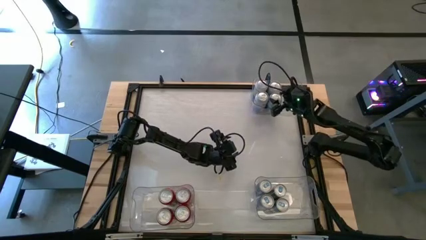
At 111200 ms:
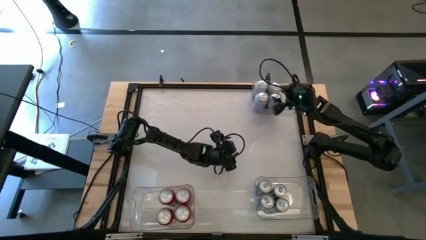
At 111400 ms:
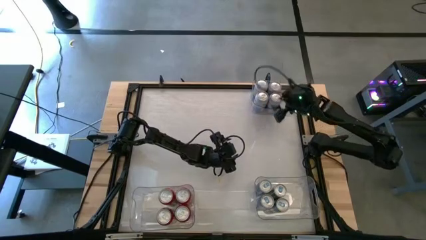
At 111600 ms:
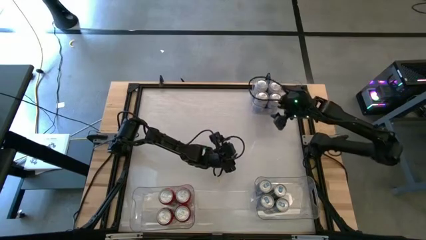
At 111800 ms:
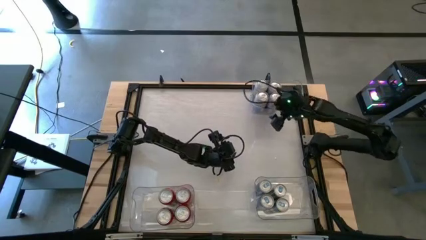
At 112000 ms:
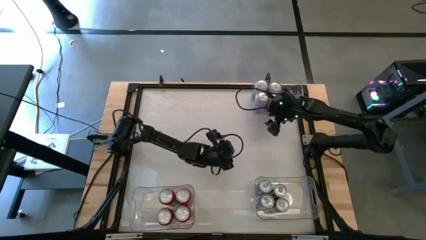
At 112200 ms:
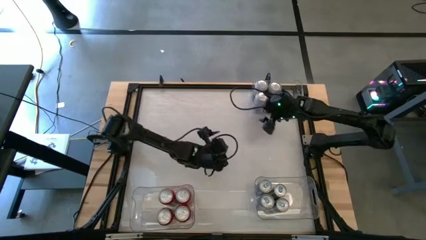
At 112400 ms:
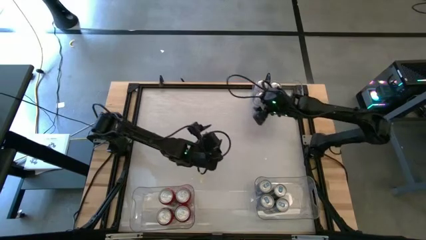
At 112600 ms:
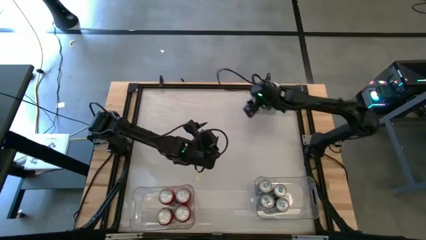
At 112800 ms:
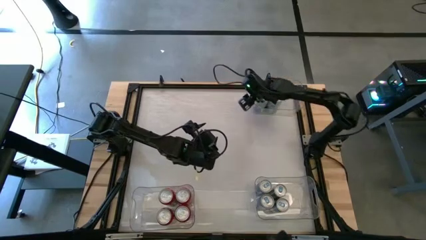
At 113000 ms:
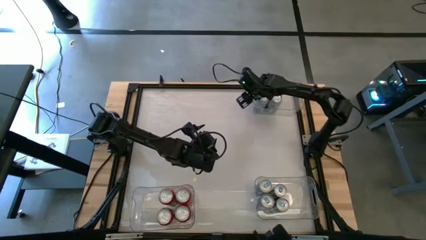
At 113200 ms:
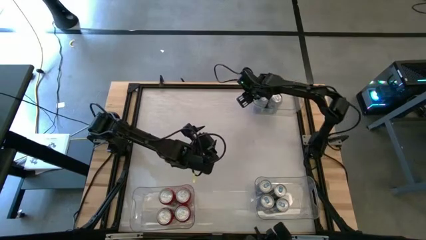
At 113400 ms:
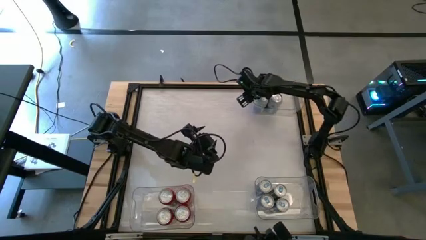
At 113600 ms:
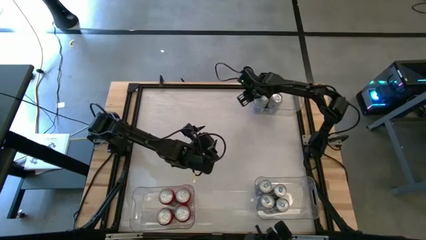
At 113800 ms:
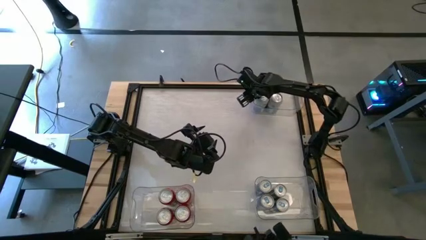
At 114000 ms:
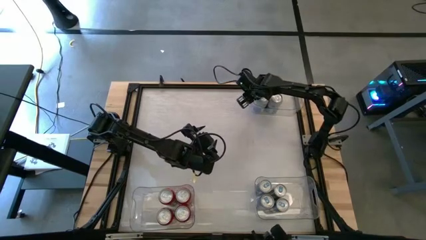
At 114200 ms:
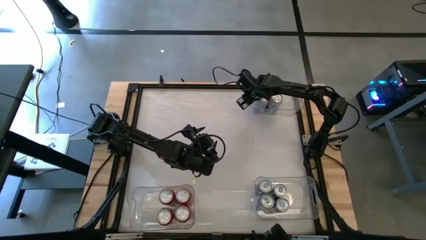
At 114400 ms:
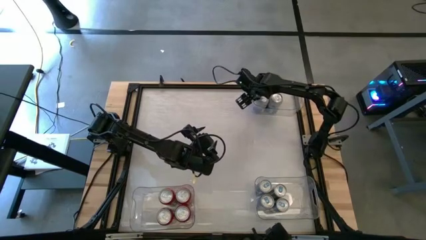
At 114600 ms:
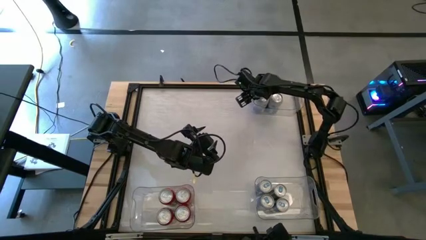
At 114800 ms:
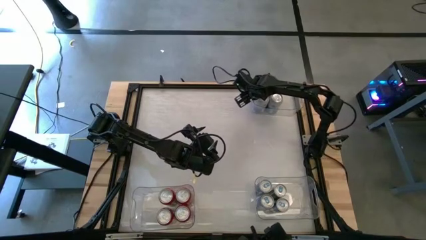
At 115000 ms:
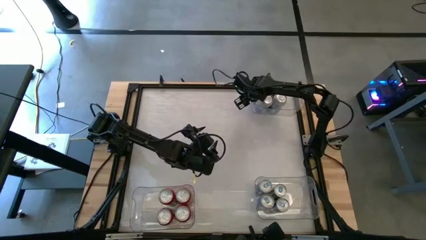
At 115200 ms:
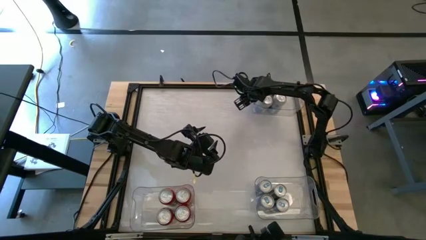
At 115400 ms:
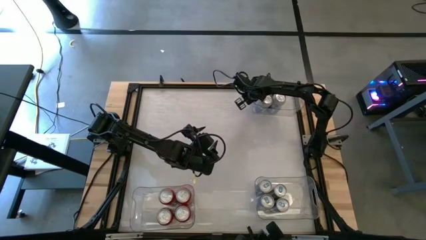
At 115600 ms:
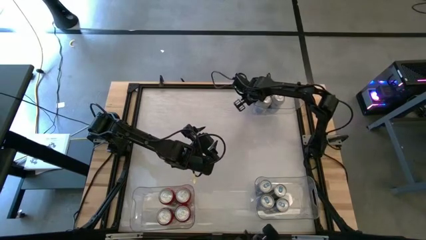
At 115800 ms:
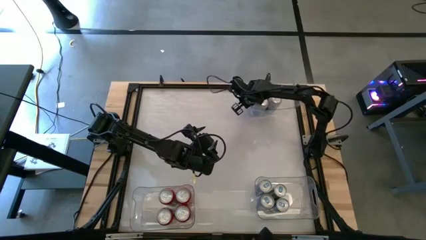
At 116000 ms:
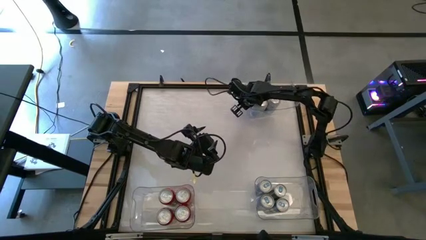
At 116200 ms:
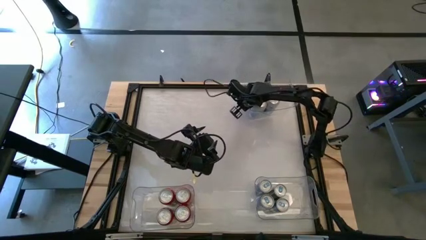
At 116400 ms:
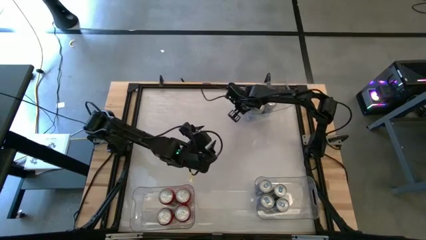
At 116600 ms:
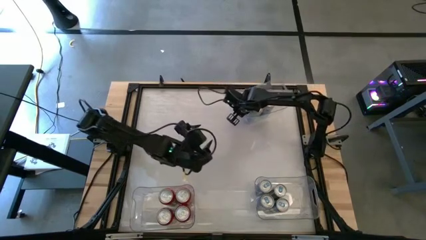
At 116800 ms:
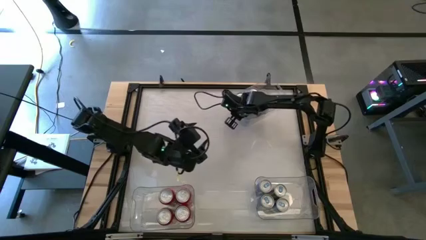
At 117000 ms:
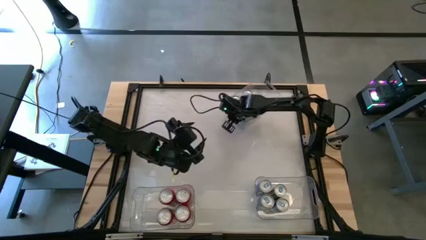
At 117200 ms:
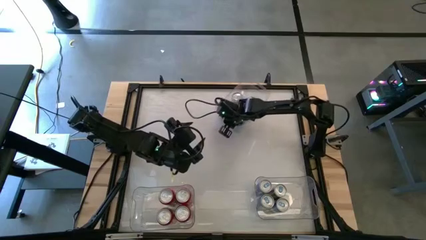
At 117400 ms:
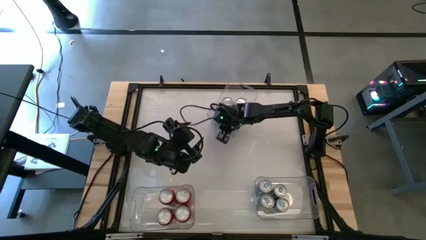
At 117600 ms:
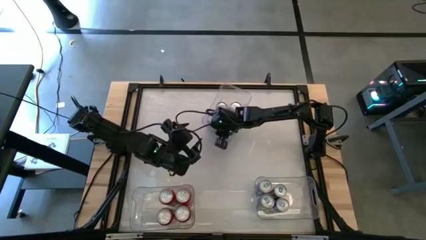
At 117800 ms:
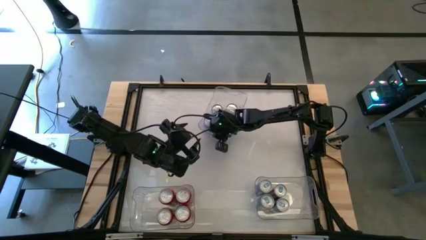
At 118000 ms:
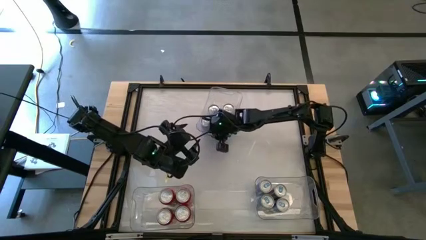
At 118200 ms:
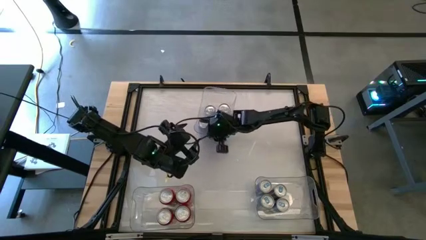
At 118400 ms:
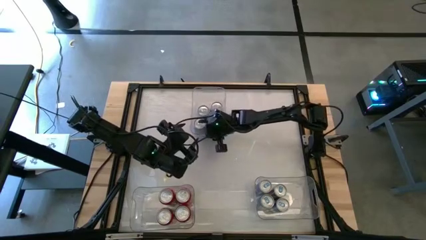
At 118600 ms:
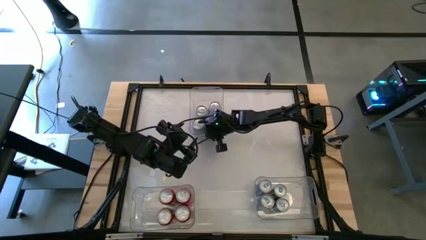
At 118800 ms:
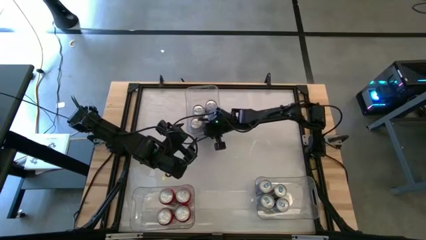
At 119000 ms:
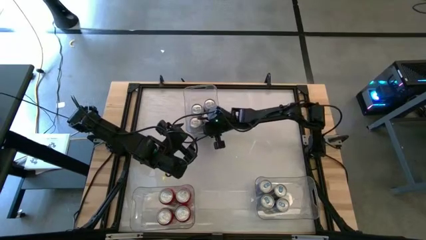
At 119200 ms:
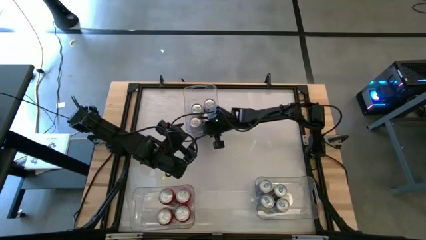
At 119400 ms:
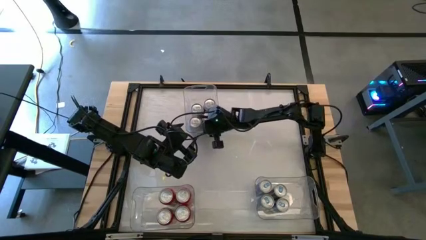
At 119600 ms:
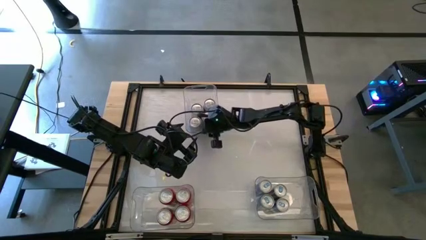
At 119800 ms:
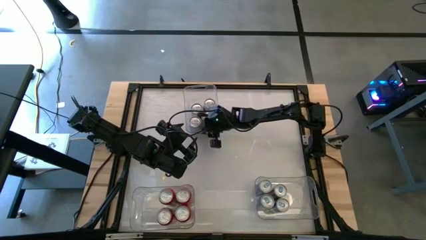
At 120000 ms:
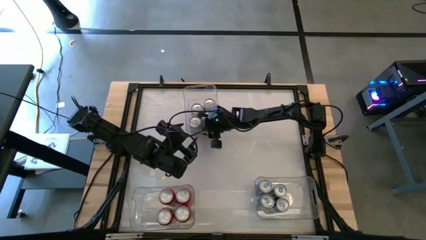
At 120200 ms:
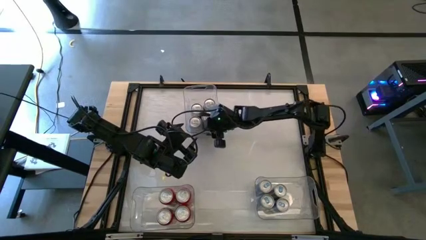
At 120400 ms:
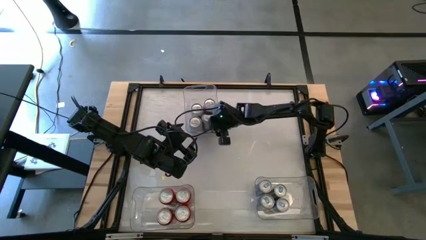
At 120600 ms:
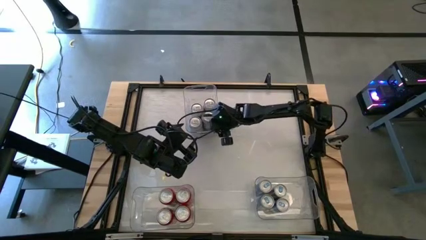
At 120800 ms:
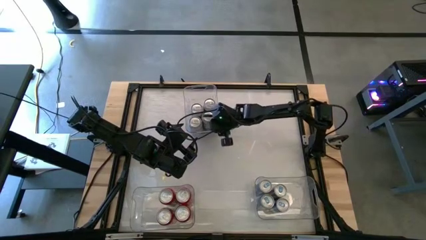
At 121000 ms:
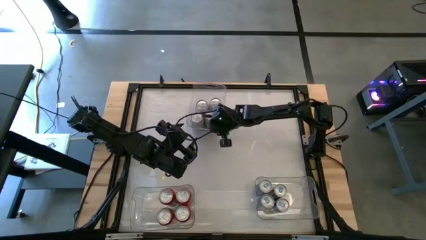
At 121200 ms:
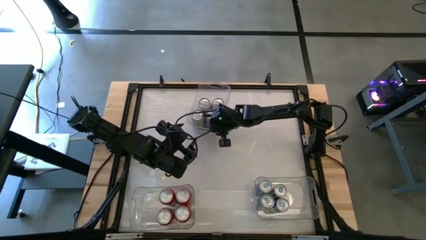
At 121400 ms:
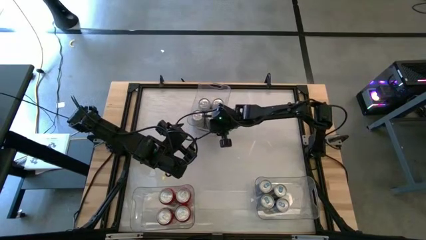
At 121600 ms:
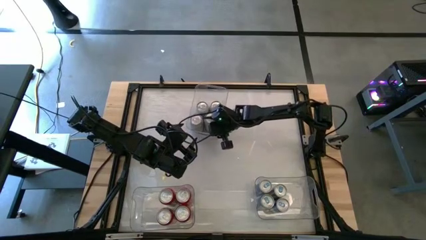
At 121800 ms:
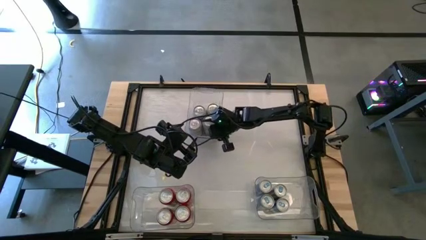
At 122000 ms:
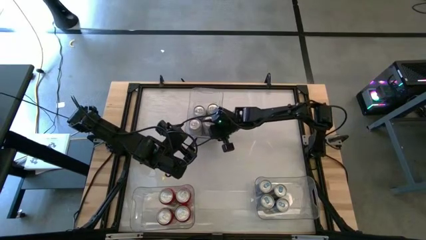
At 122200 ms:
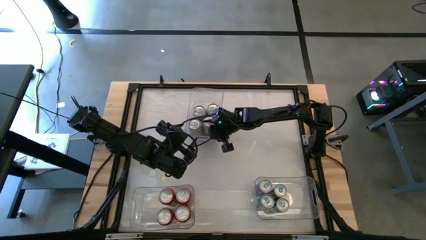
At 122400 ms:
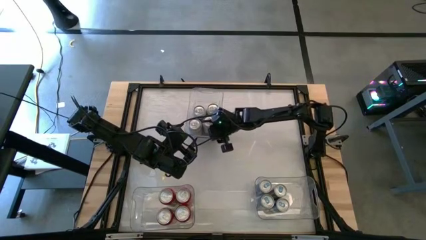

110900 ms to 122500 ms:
Task: Sort soda cans
Move the top right transparent bin to the top center of the table

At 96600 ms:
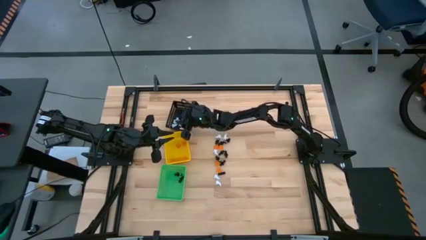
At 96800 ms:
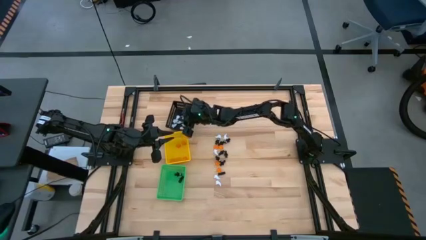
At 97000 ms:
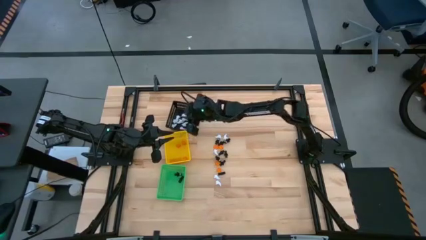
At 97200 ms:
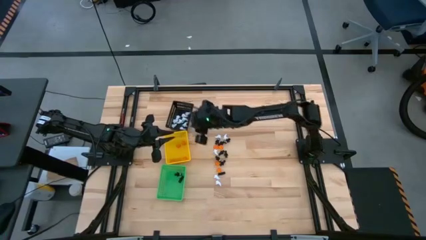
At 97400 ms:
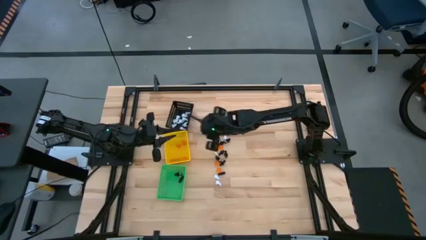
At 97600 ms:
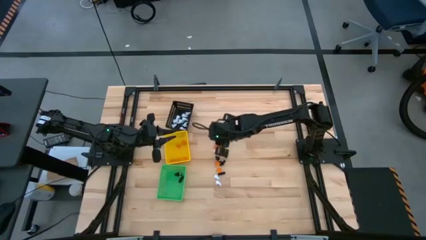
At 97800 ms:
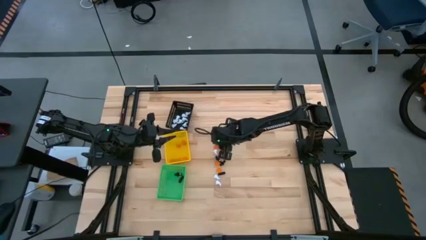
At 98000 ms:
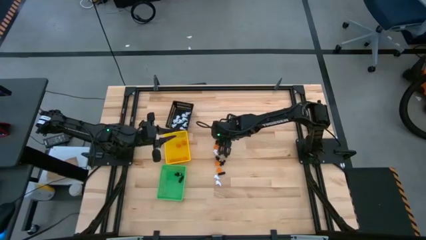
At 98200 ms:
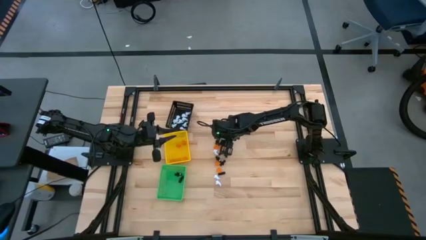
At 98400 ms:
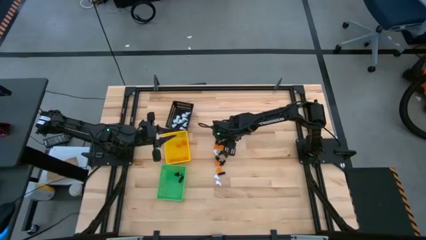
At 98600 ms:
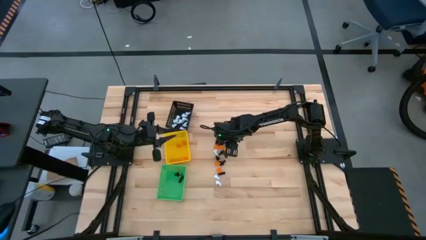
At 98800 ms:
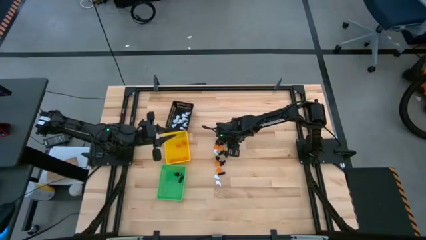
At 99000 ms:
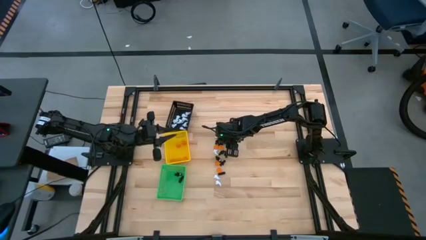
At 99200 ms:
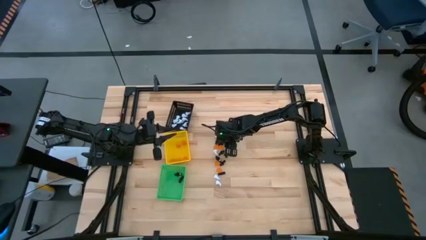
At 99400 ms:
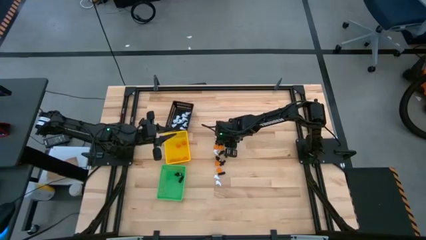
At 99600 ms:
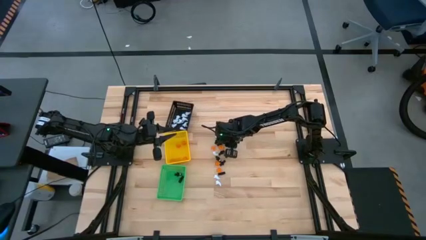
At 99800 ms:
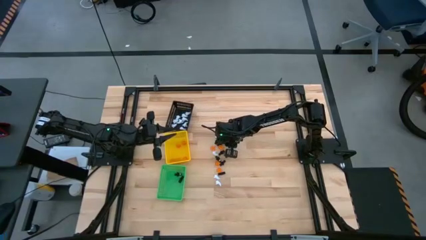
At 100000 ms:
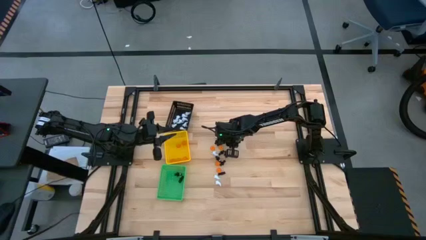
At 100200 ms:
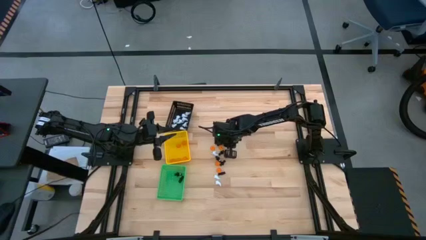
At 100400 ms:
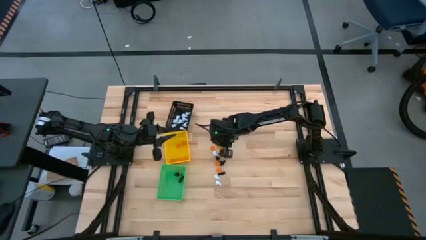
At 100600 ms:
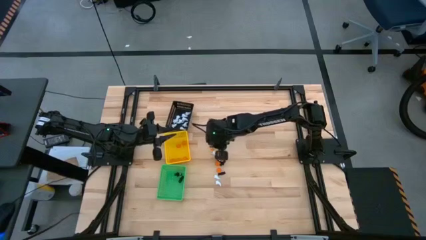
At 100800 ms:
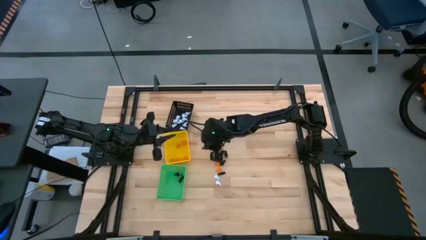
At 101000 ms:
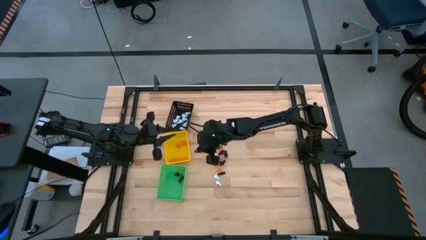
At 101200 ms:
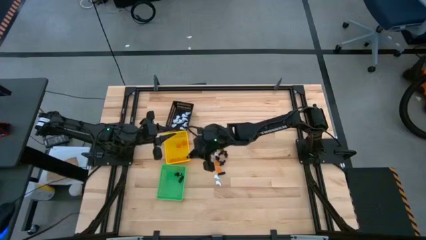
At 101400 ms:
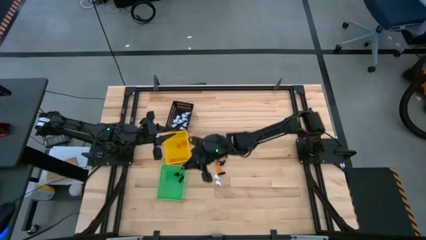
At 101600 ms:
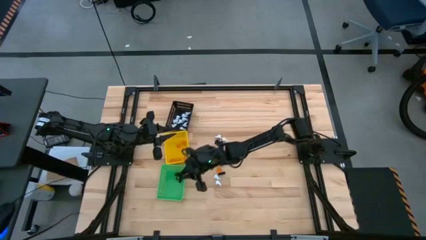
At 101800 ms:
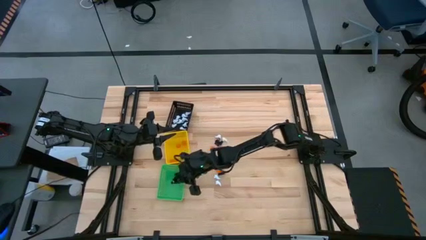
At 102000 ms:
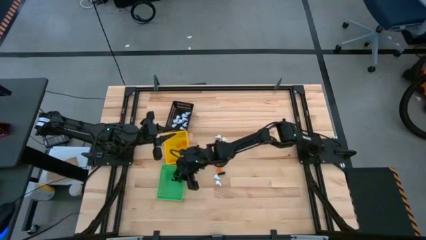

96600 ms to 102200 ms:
Task: Sort Halloween decoration
Put the black skeleton toy into the green basket
